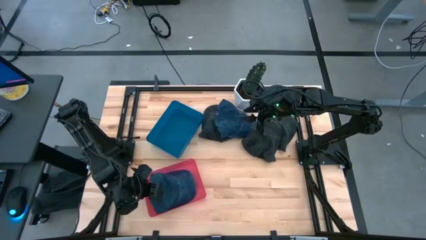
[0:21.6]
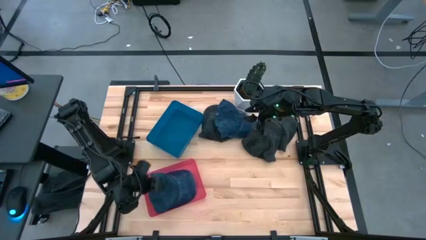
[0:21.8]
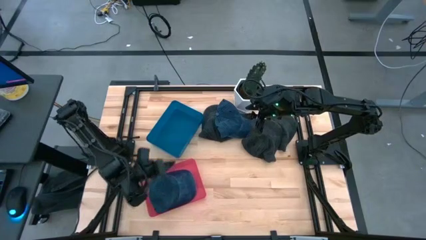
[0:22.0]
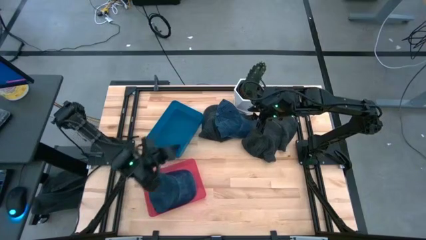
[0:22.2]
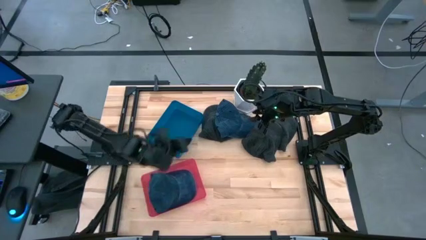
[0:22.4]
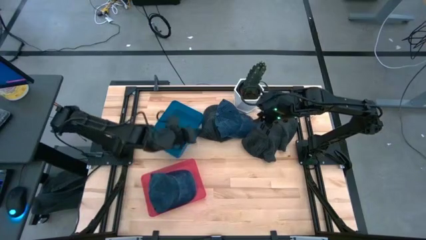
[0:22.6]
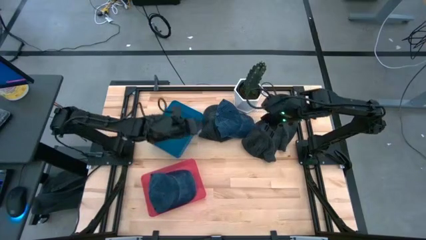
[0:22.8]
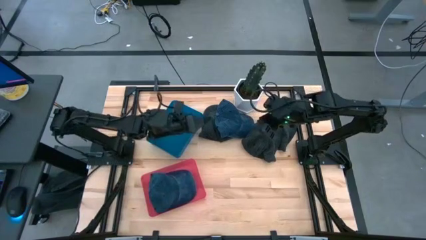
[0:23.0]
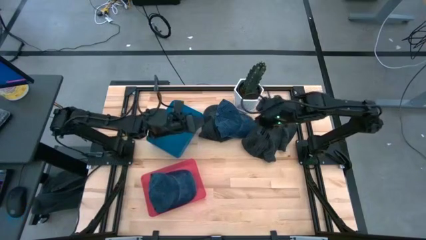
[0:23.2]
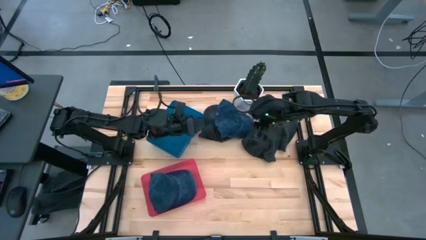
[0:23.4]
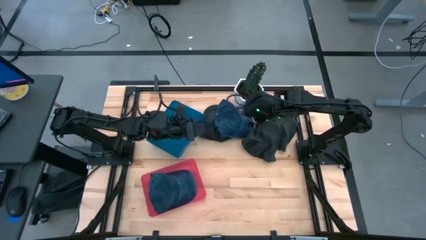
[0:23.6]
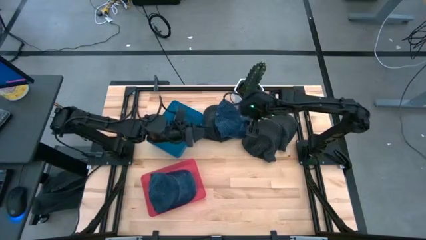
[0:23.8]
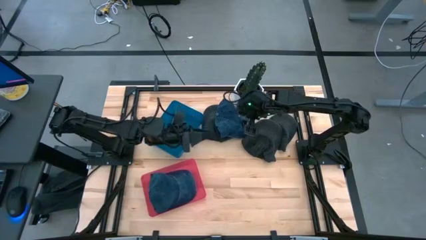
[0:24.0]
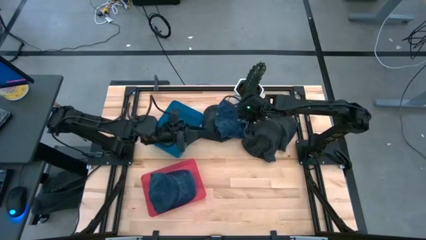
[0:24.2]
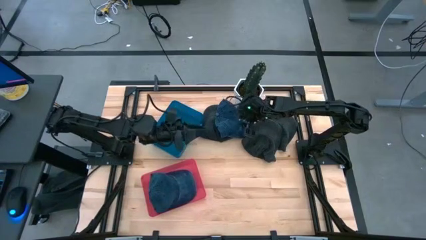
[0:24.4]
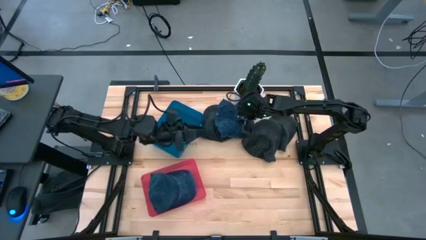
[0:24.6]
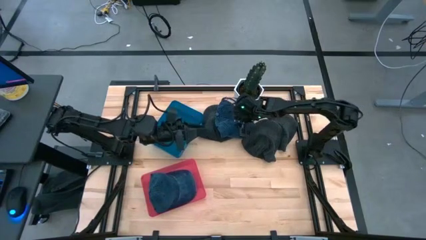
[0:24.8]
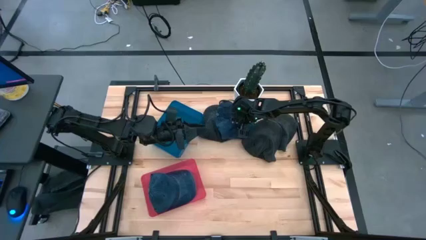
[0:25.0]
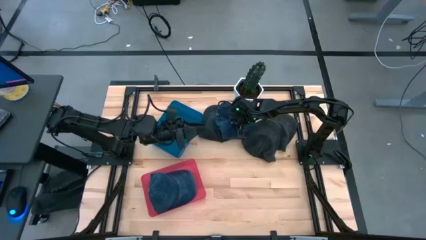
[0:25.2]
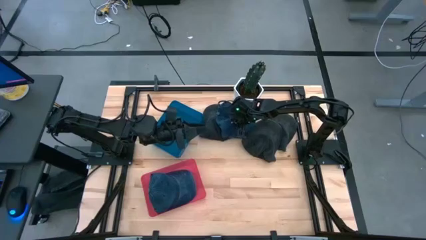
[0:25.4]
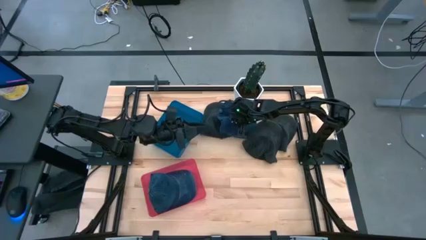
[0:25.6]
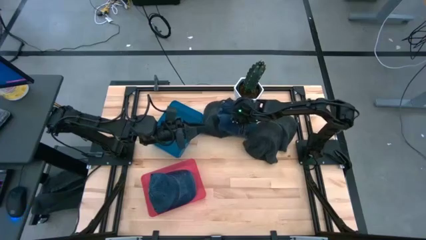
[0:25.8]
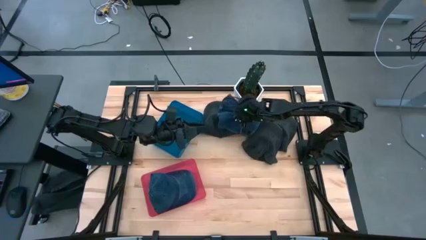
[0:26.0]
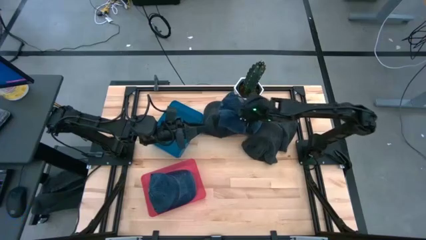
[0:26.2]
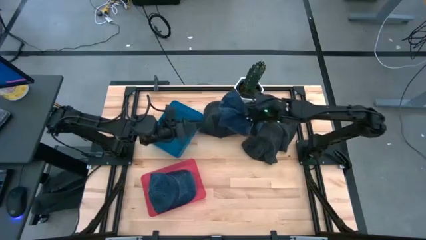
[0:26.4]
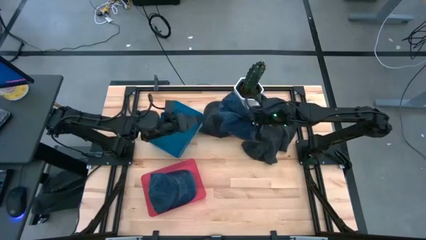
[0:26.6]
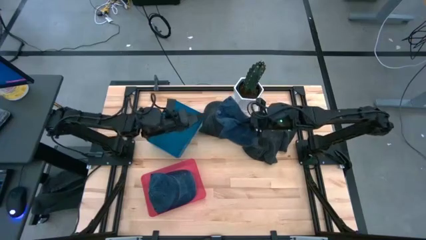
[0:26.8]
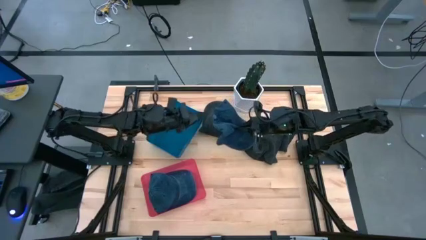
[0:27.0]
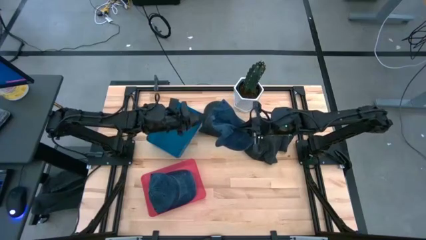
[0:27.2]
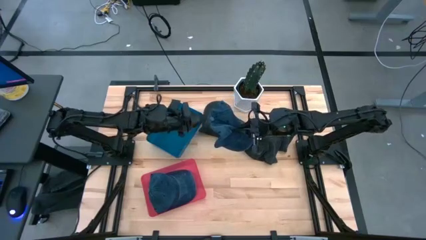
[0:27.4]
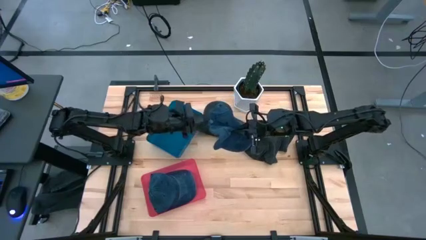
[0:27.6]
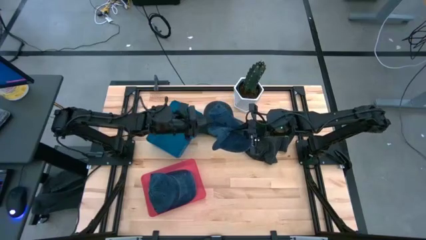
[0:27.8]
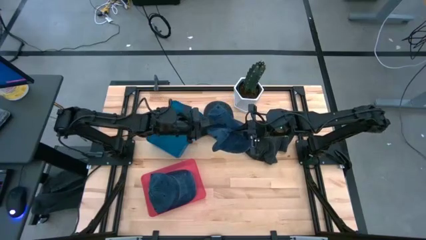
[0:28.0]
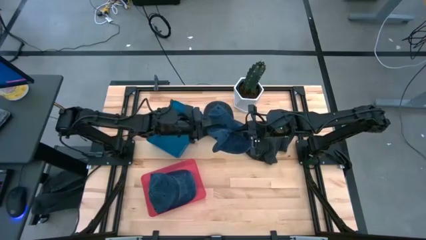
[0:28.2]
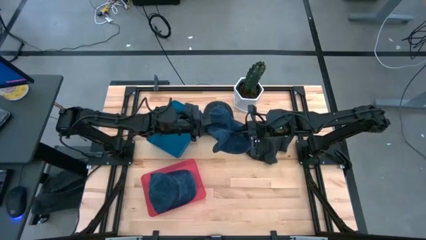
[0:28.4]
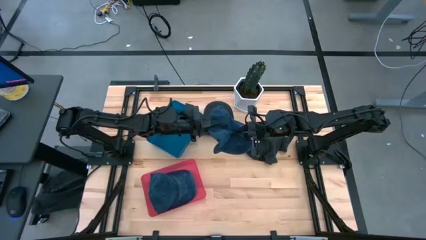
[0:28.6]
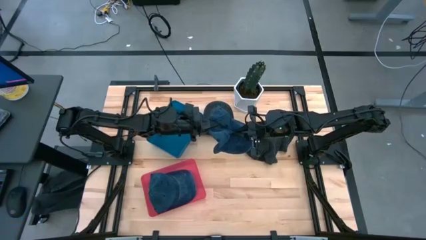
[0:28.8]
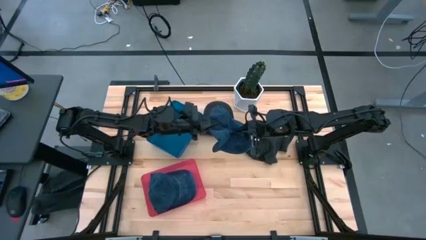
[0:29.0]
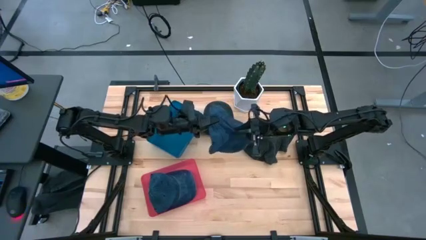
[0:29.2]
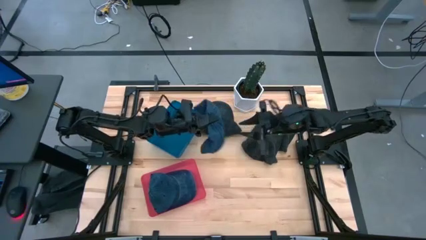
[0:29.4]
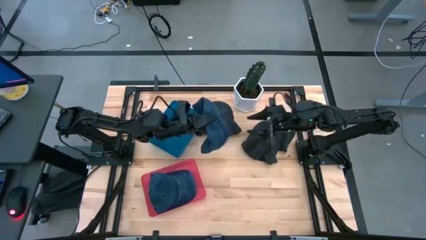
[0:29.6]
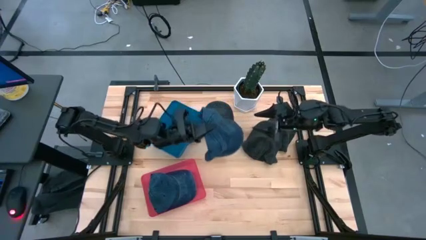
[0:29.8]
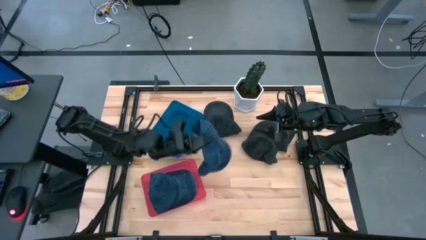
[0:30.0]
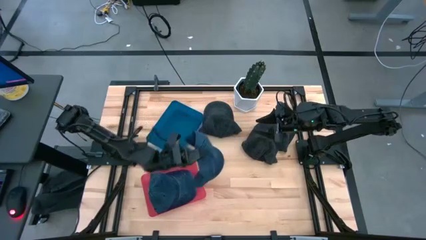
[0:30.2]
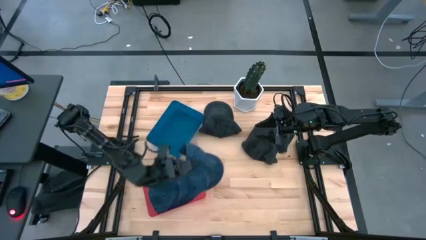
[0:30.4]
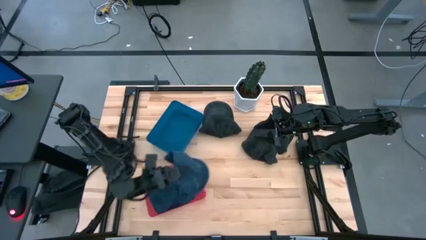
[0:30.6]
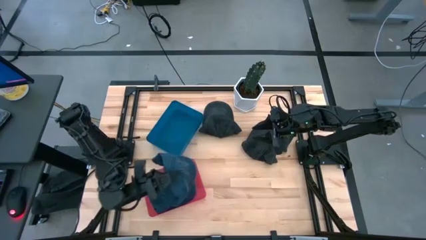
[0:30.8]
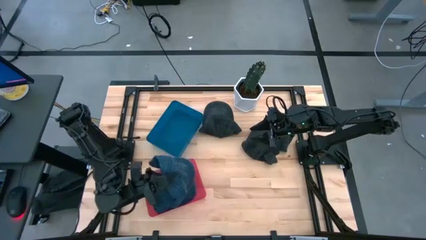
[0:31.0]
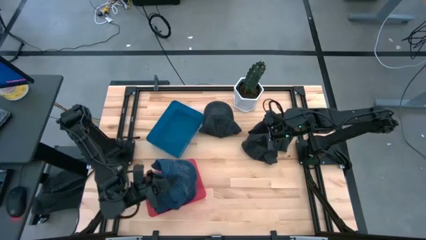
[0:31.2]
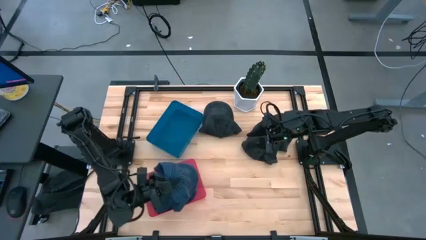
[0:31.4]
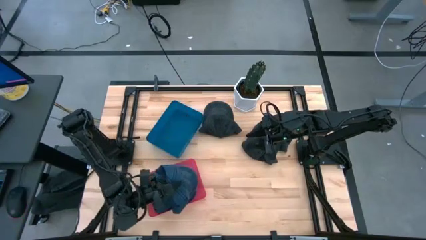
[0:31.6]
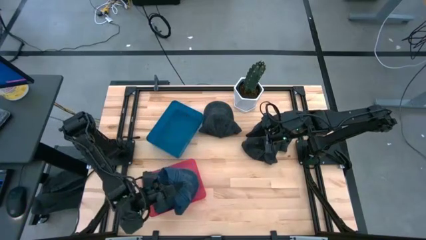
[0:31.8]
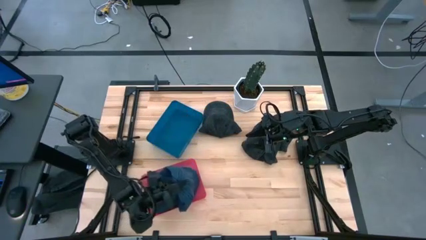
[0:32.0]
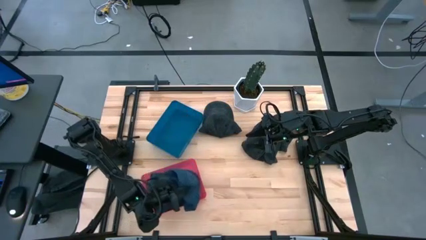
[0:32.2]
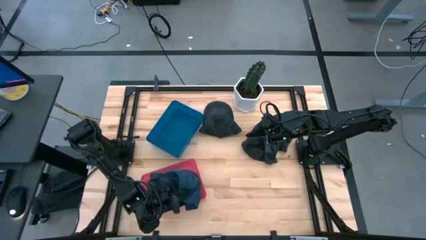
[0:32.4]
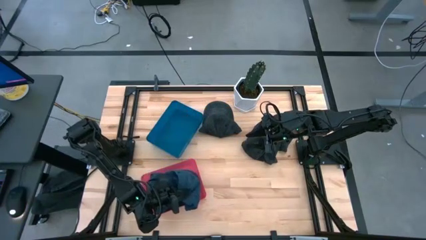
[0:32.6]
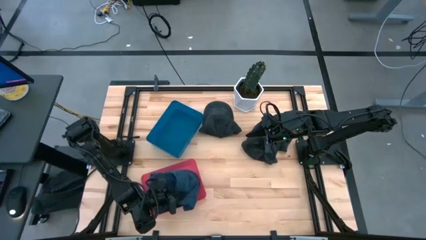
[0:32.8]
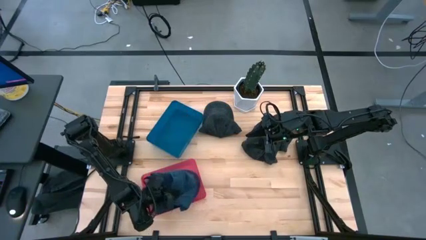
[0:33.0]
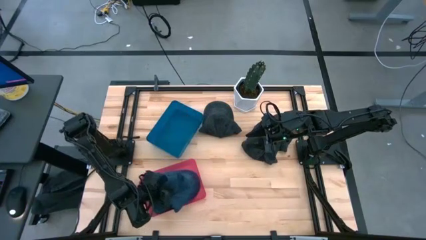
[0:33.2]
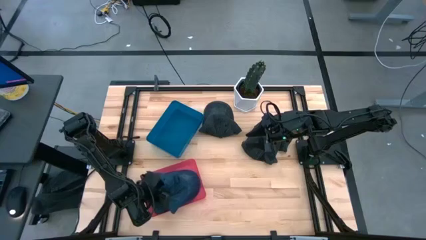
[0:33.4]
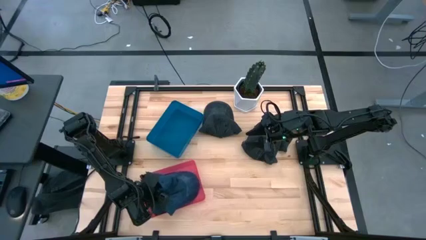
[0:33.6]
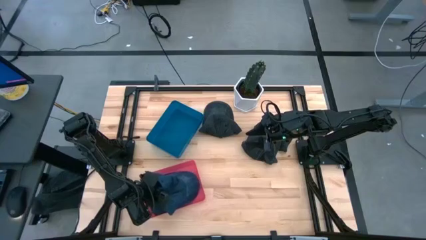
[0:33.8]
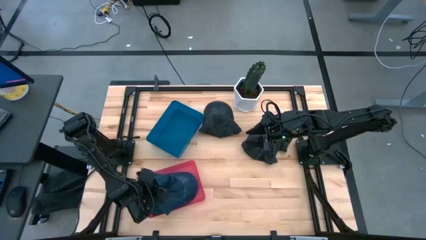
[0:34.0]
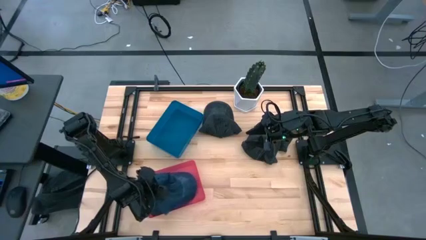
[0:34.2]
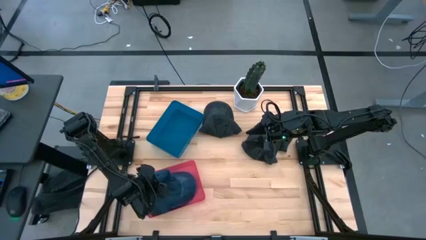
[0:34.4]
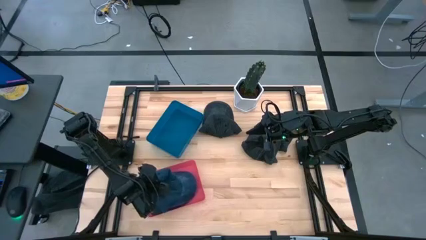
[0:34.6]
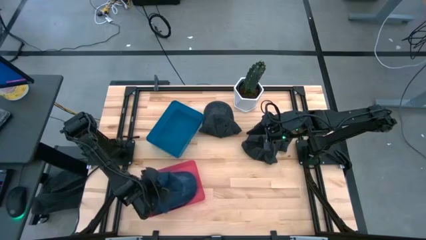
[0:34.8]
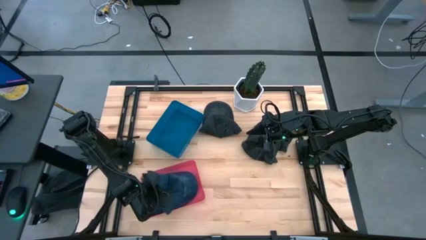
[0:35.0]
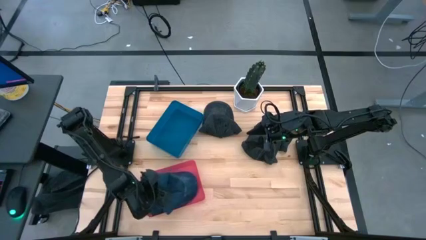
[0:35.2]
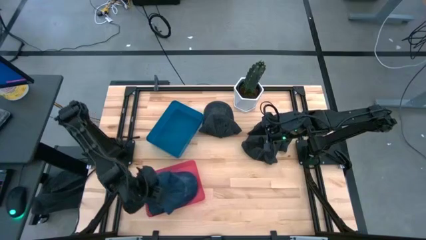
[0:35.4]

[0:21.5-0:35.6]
Task: Pick & Place hat
Put the blue cap into the red bin

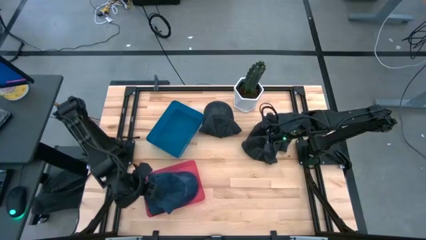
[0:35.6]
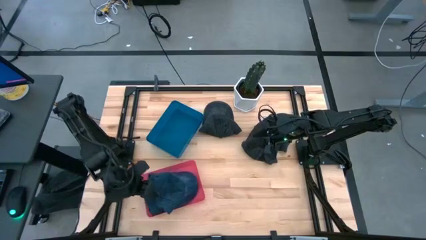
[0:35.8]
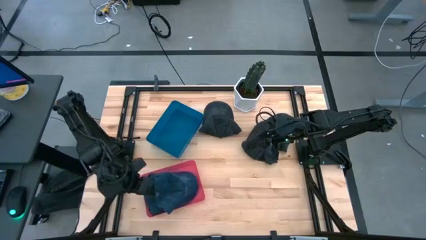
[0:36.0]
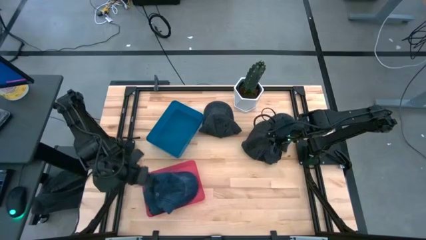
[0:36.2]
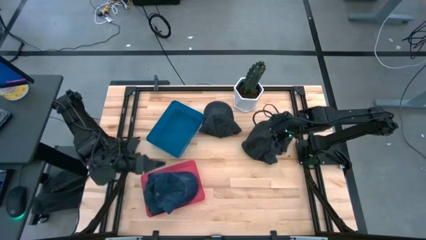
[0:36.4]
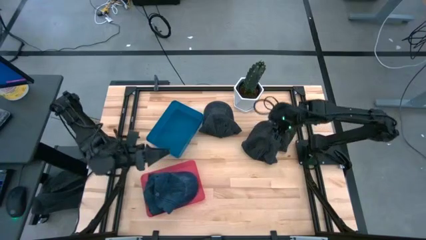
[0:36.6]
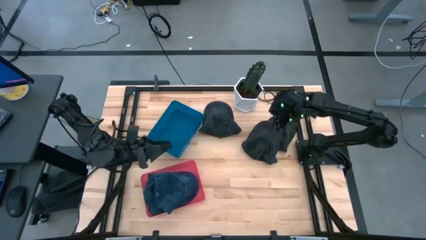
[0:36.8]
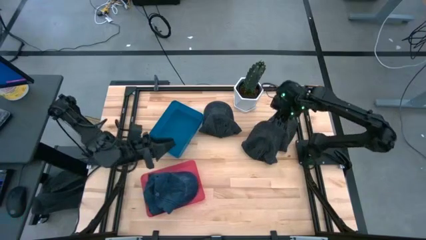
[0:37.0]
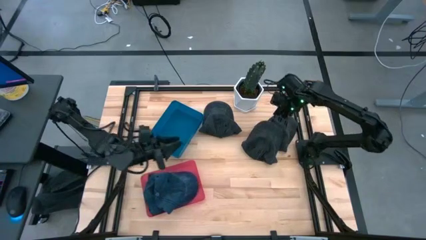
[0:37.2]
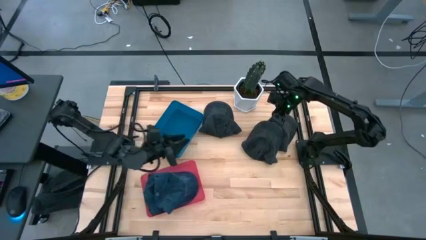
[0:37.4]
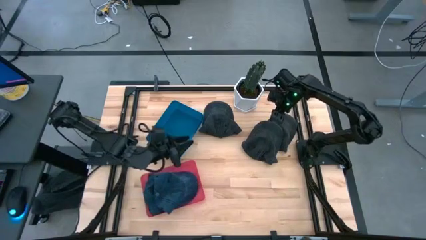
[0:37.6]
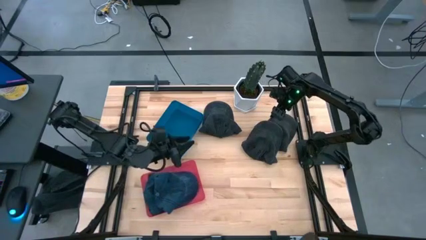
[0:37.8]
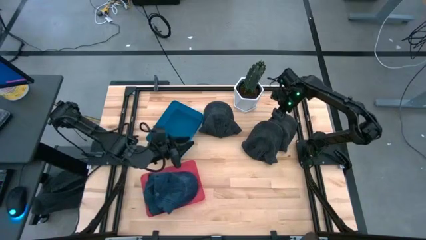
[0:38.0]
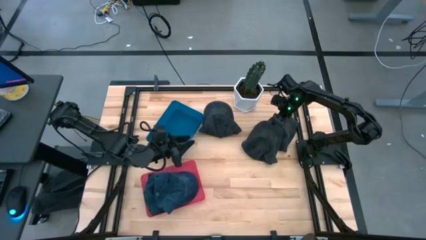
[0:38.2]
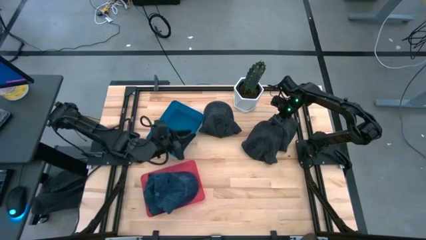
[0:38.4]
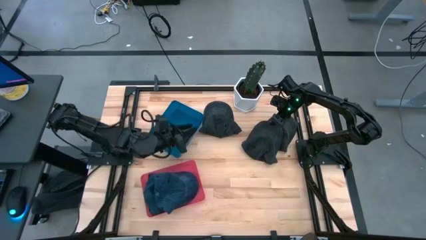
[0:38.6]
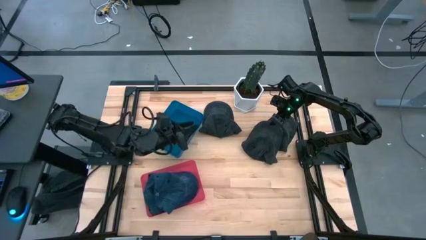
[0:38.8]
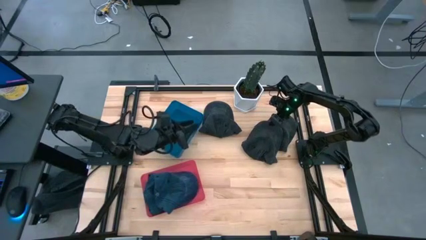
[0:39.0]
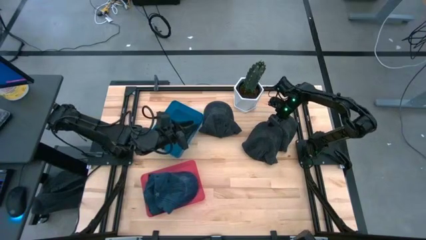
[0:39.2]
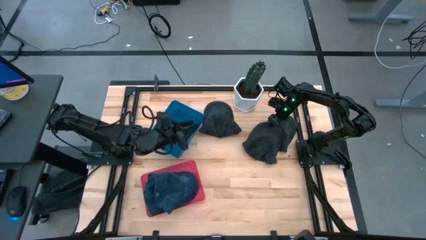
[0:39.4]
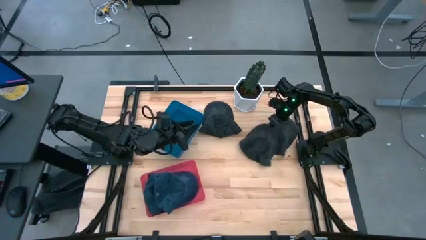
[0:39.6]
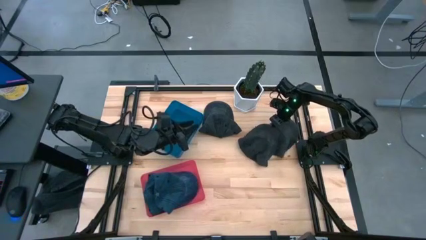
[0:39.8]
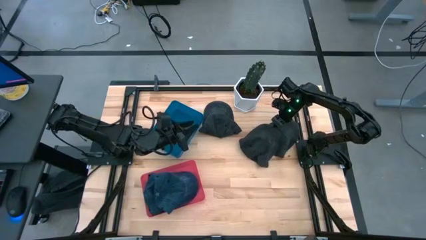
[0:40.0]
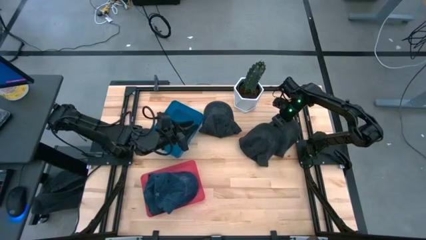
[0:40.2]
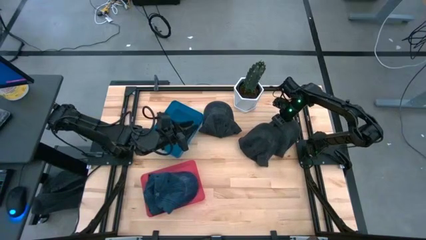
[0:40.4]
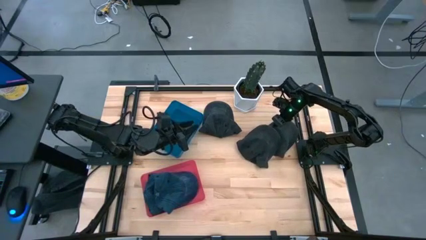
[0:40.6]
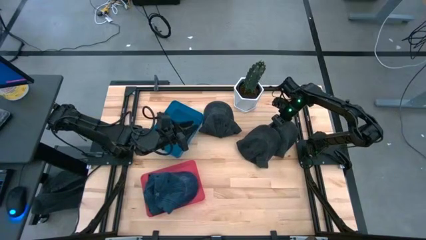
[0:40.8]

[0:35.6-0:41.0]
Put the middle black cap into the blue bin
